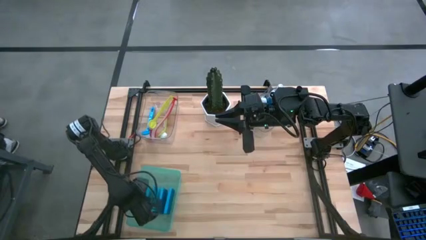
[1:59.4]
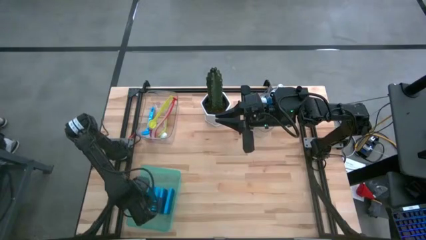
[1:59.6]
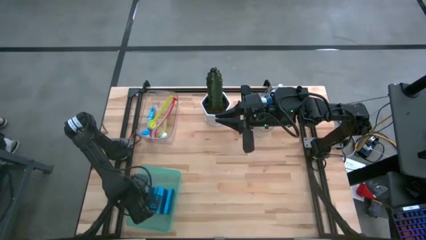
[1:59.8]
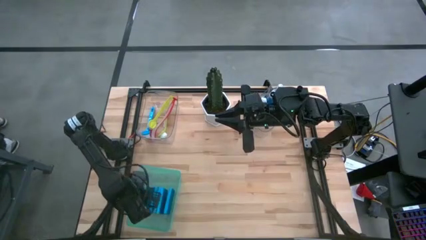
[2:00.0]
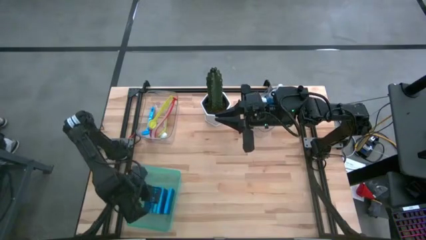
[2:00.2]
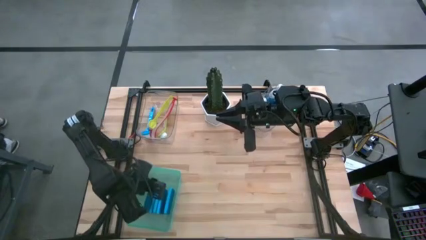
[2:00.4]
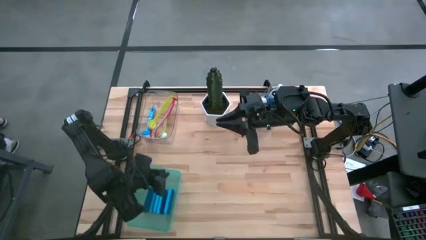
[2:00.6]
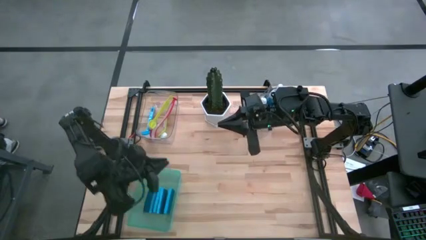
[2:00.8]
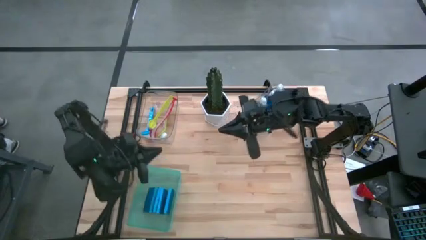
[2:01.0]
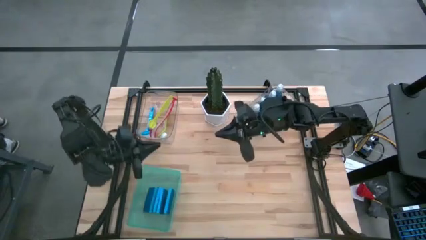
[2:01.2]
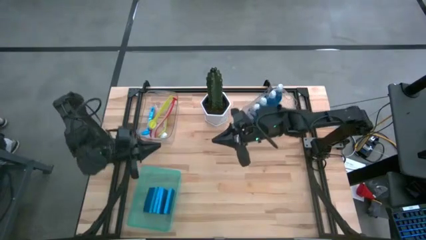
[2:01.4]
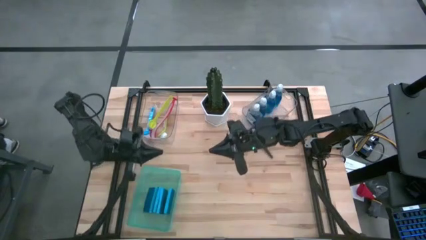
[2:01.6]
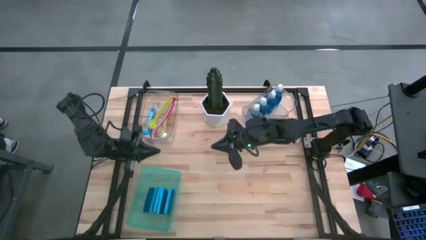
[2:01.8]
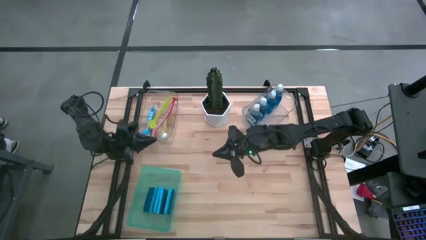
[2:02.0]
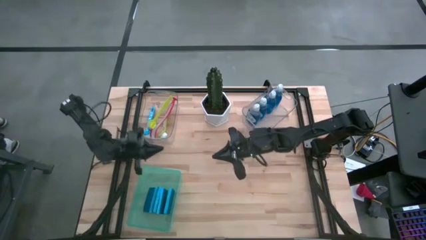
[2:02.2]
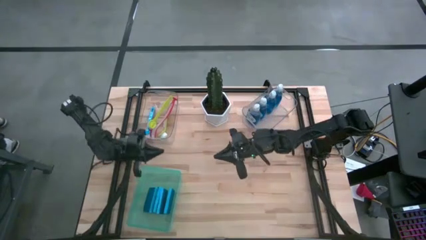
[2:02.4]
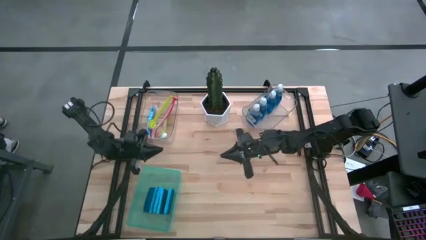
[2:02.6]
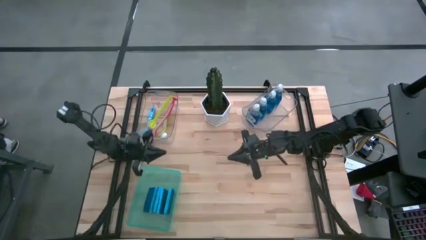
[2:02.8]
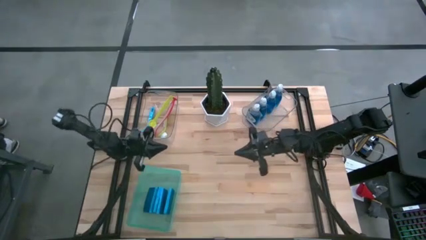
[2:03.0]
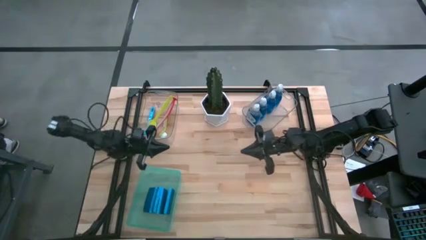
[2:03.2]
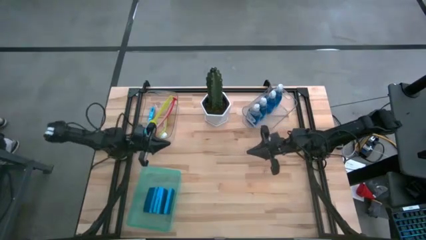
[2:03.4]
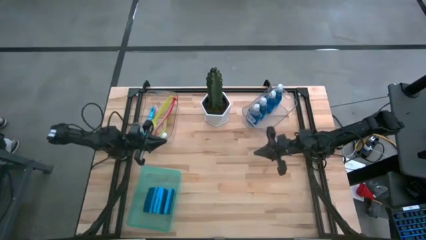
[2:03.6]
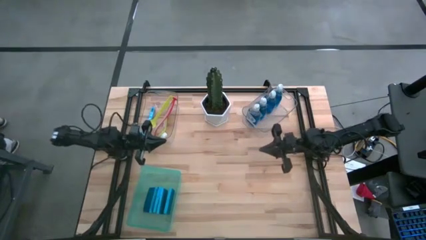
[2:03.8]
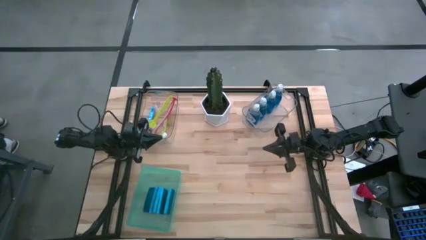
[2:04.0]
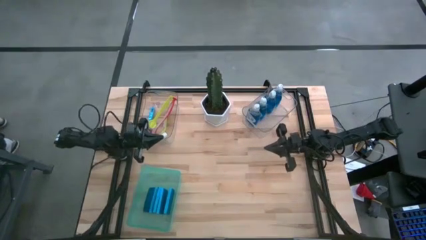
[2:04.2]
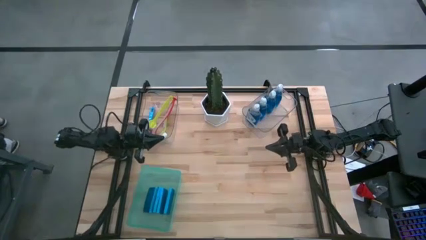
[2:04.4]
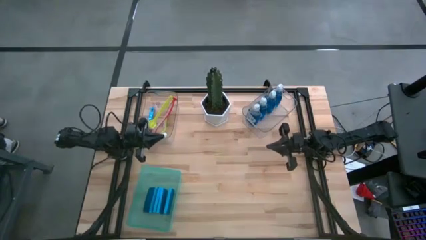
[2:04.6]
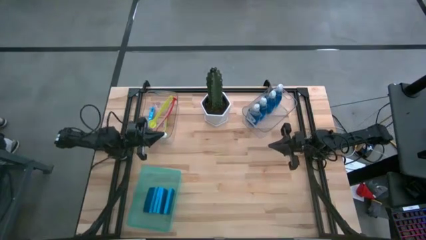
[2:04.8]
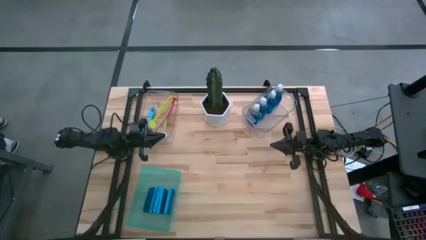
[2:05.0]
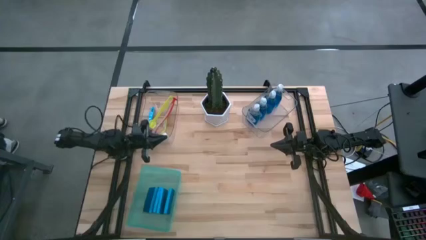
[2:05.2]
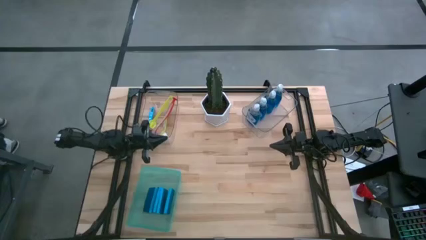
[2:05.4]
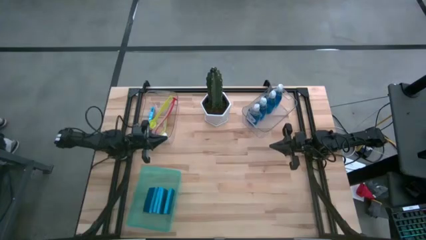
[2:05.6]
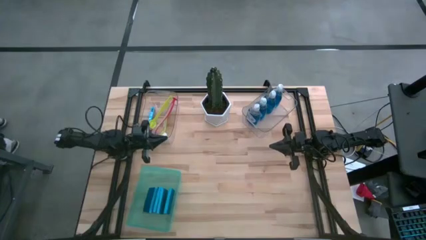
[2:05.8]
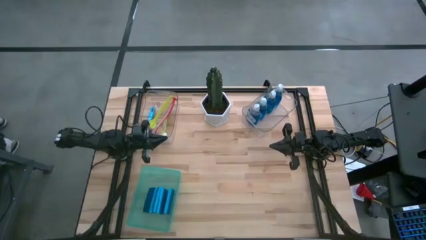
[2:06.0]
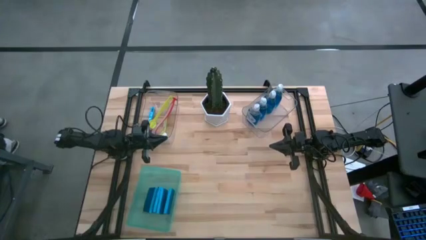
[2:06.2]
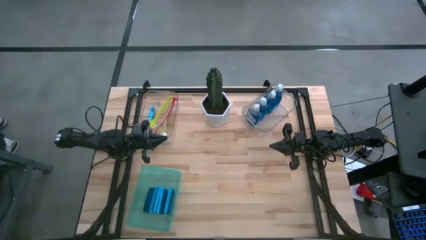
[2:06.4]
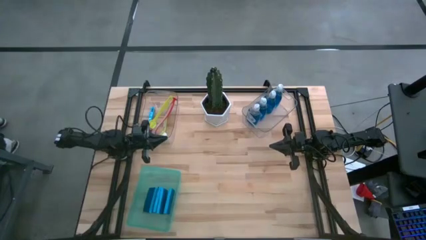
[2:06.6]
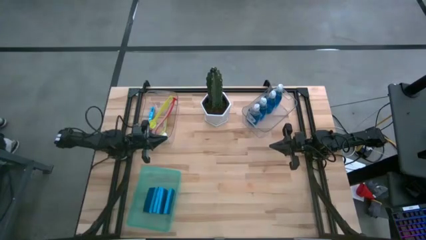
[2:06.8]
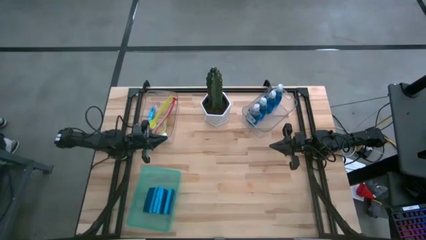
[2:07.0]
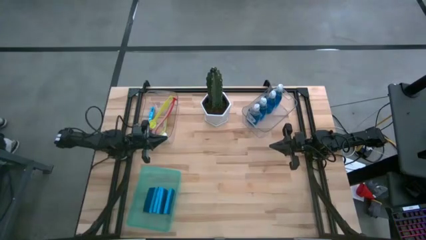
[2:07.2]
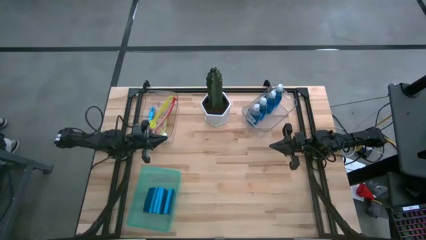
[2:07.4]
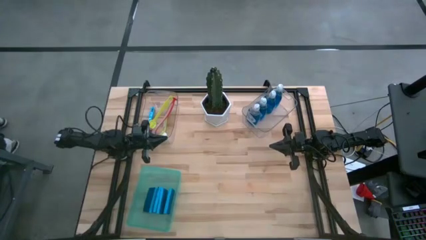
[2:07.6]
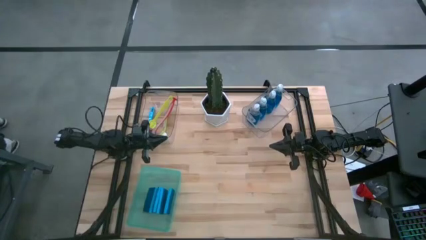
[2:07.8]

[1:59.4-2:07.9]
Task: Pick & Place Kitchen Sink Supplies
Return to Home Position

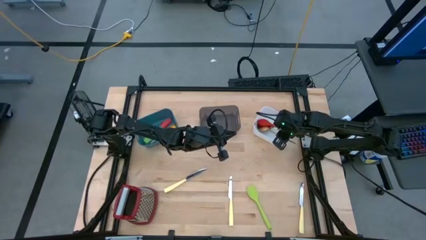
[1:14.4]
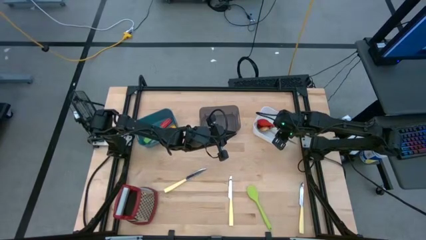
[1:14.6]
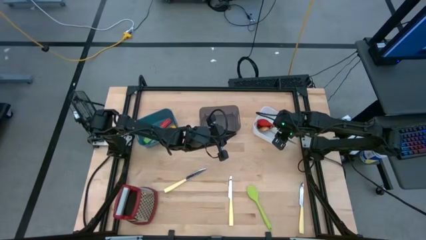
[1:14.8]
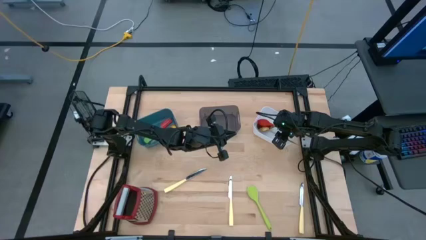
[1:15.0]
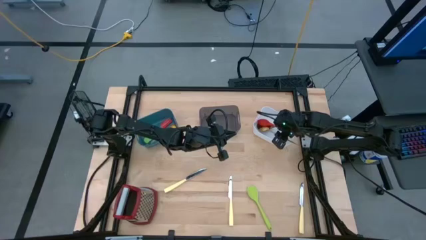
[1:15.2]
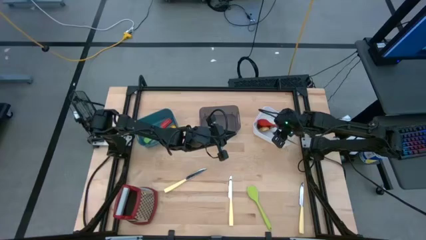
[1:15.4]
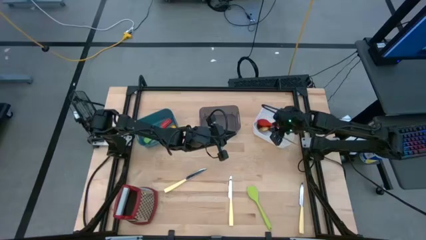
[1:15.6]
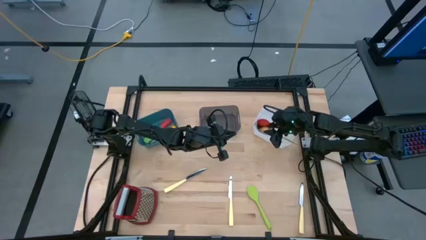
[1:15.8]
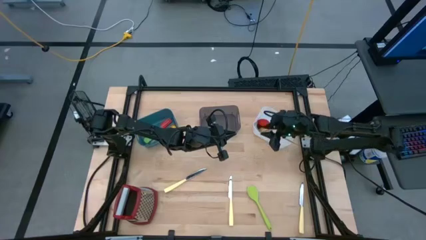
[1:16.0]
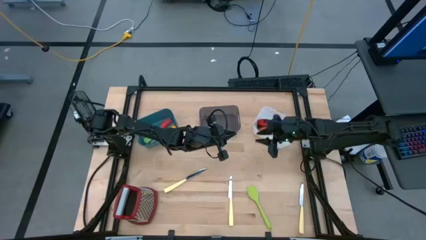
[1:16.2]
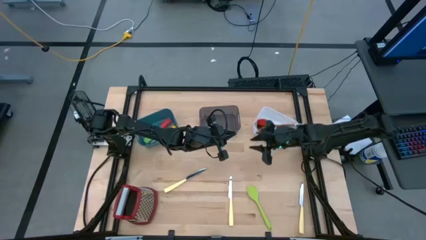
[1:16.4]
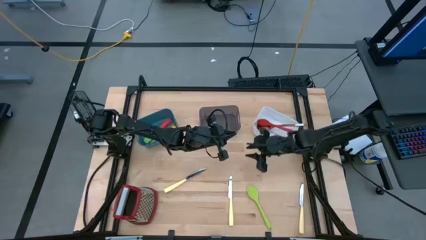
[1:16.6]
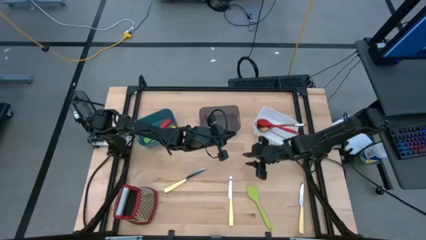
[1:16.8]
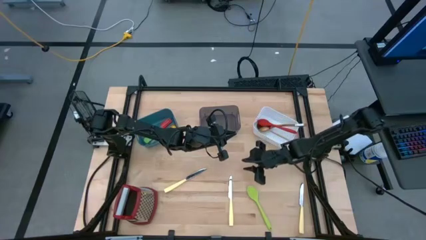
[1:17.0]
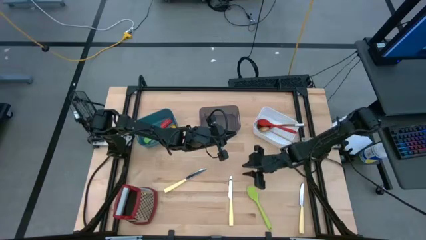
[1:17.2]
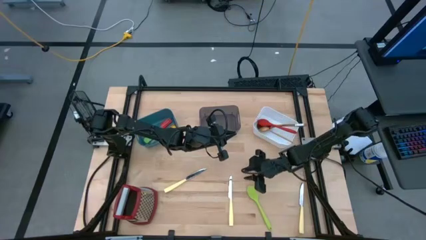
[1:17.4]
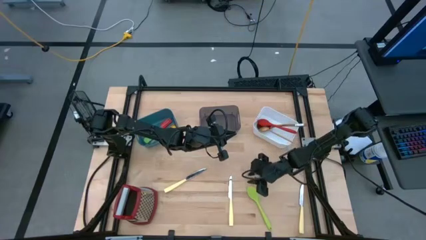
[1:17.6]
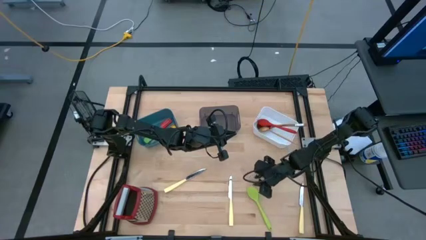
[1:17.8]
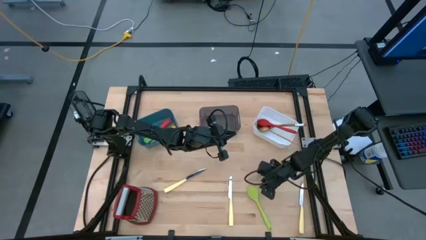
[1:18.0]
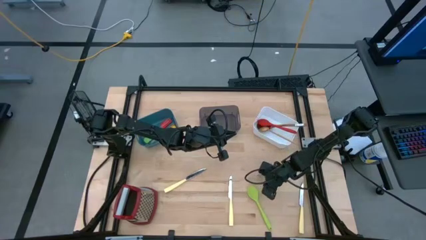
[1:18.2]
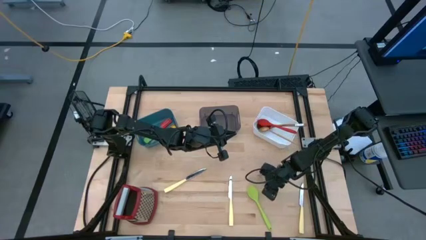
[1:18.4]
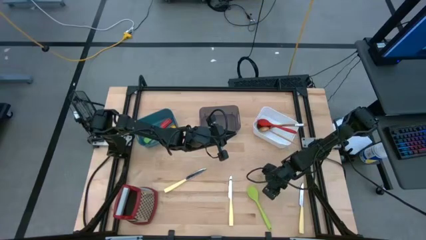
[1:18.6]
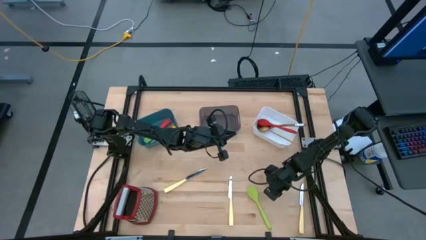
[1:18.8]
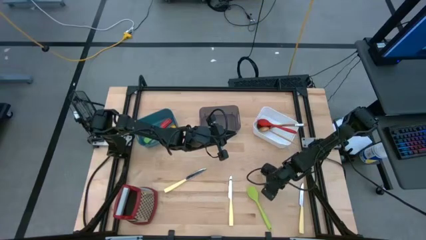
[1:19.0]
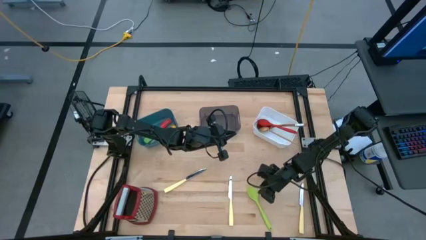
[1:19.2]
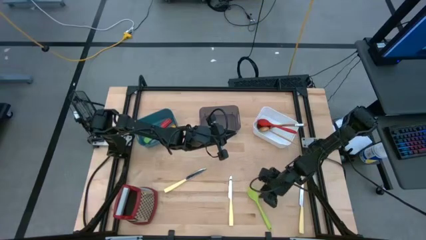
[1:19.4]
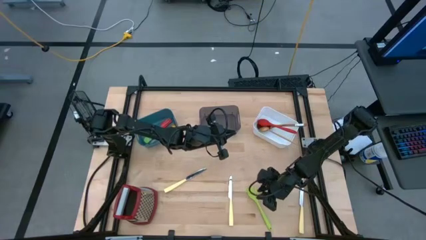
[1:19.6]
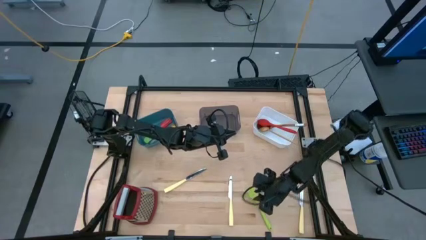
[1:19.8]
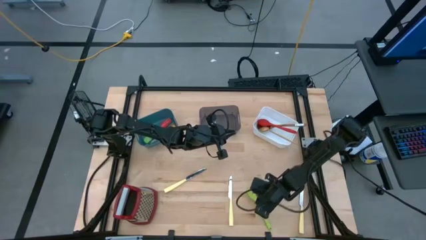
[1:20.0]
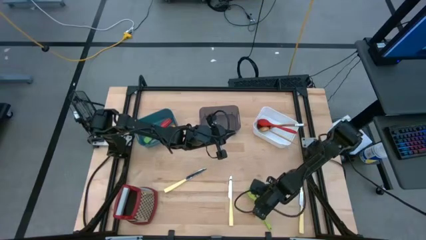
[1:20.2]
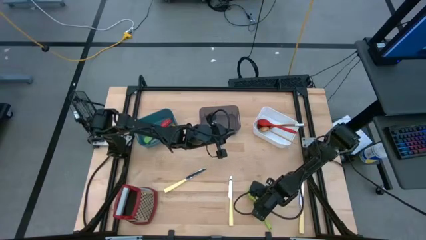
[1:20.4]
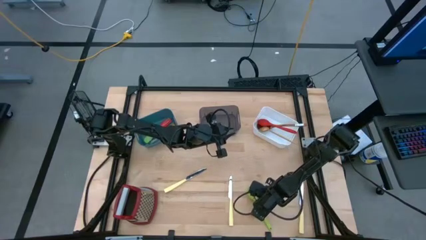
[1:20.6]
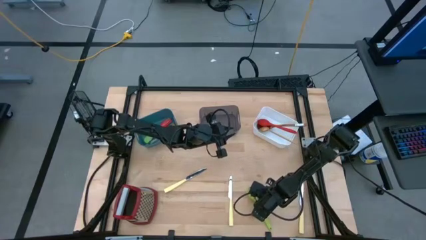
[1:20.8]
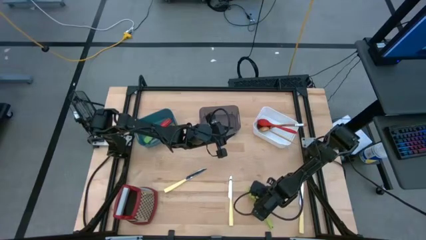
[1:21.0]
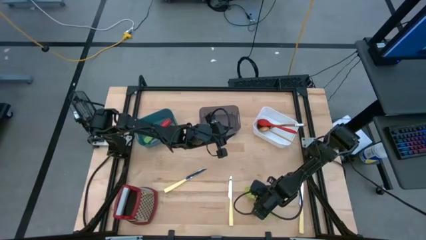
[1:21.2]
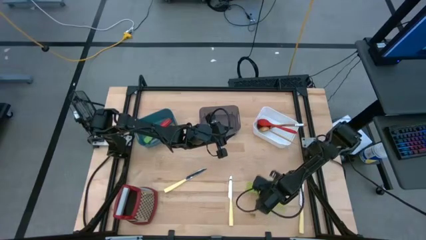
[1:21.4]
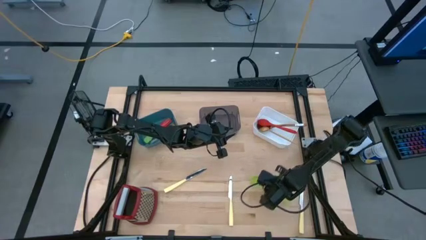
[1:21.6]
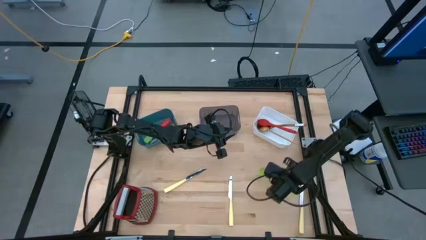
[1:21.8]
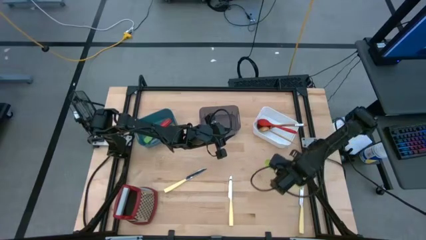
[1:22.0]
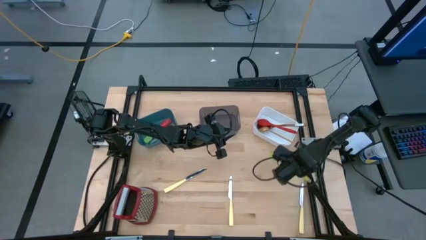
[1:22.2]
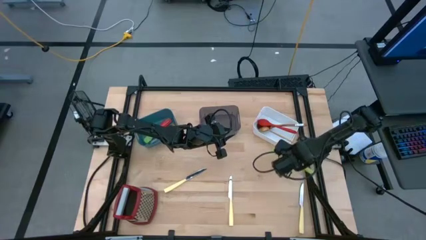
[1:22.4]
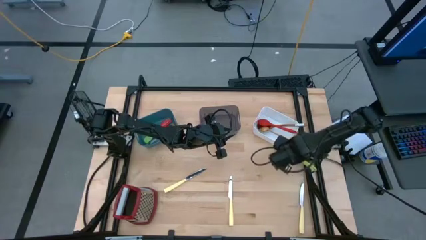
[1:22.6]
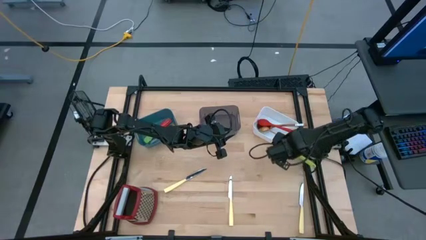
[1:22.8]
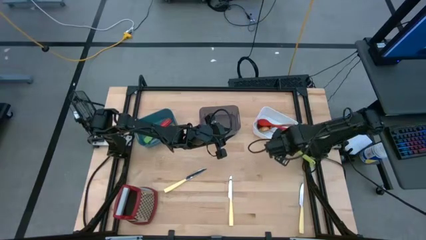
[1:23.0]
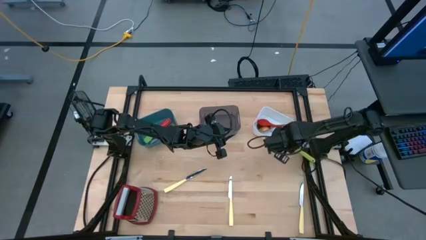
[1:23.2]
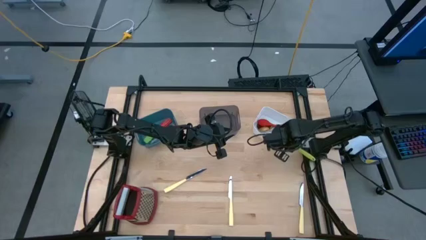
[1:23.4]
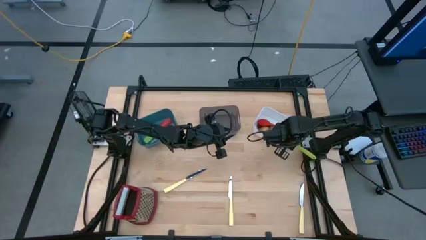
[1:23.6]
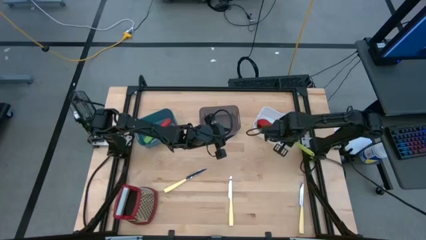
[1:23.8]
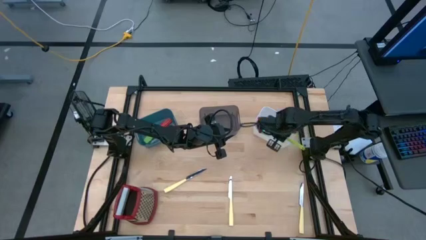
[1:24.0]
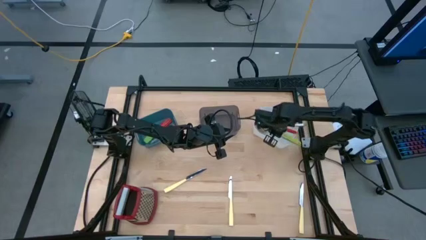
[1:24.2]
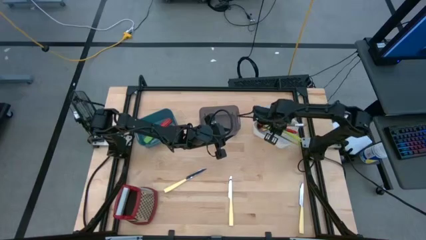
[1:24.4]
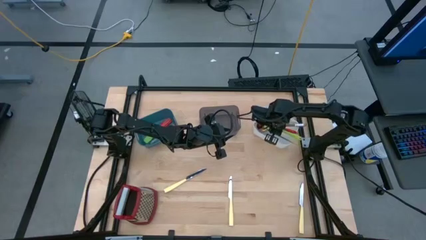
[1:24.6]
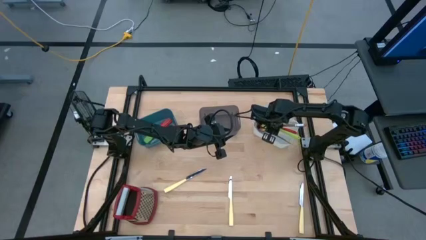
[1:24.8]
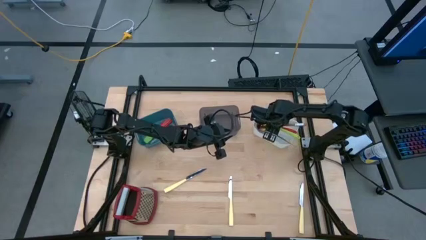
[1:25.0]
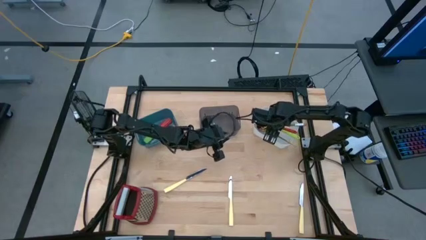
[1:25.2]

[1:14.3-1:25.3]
Task: Pick & Place Kitchen Items
Put the green serving spoon into the white bin
